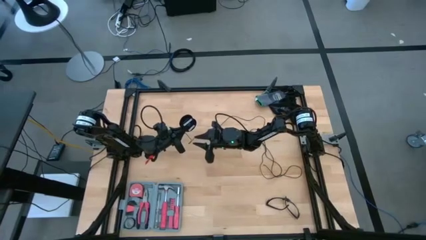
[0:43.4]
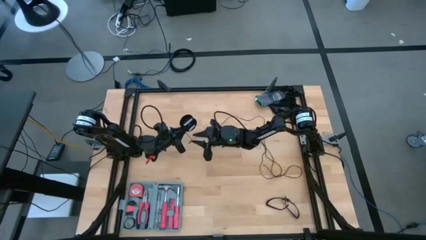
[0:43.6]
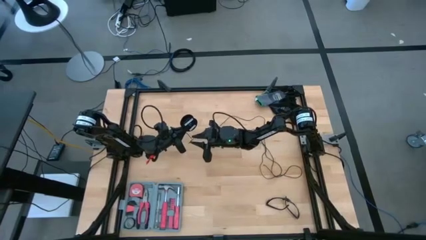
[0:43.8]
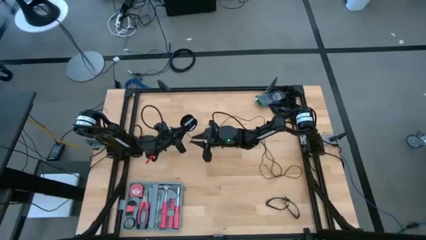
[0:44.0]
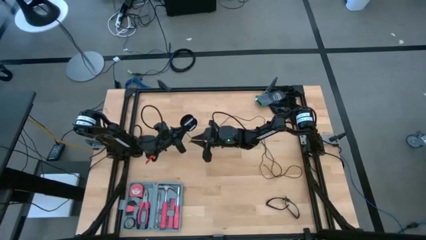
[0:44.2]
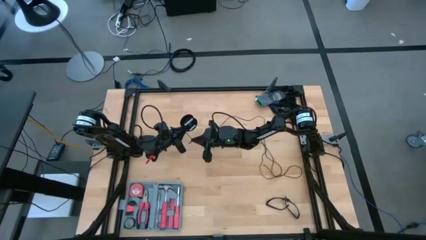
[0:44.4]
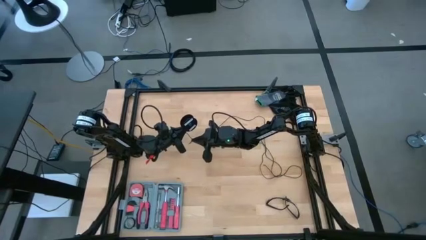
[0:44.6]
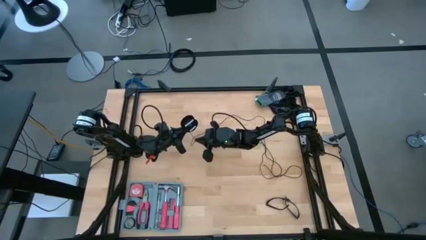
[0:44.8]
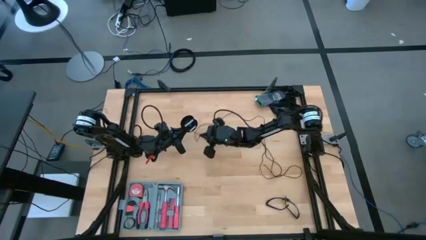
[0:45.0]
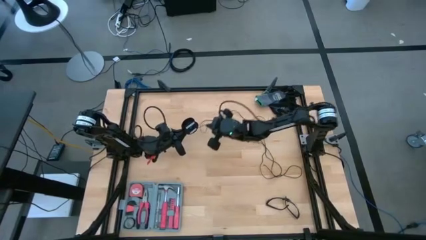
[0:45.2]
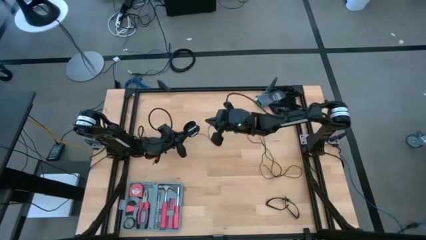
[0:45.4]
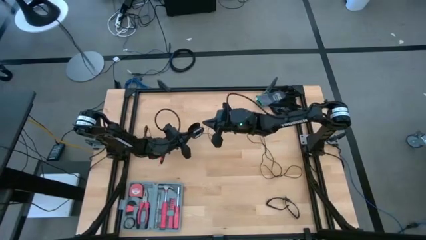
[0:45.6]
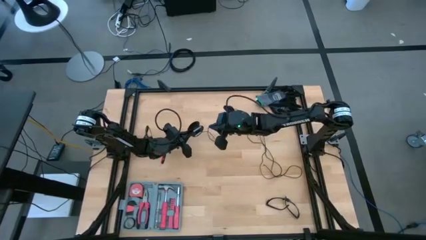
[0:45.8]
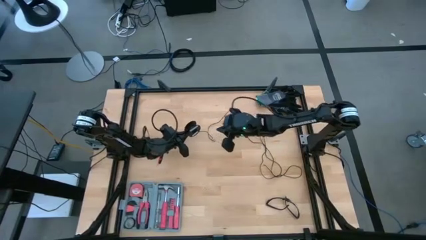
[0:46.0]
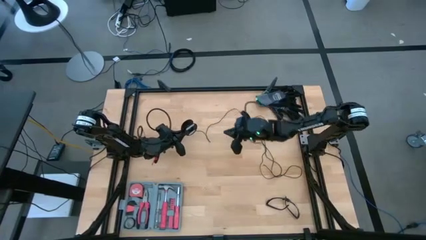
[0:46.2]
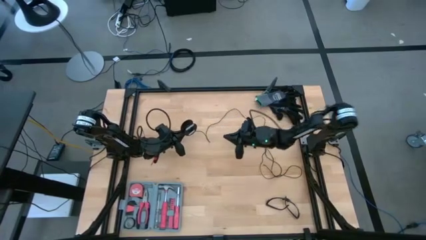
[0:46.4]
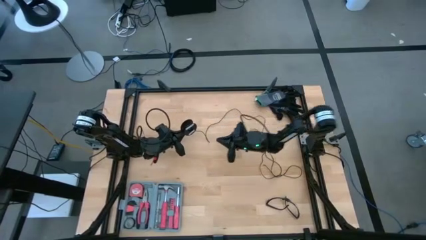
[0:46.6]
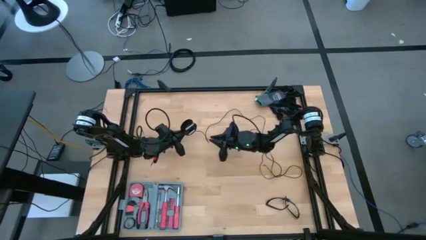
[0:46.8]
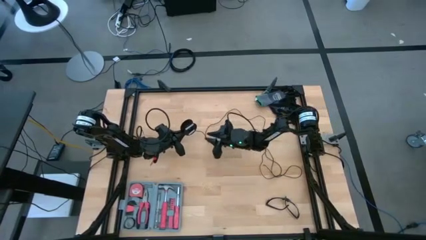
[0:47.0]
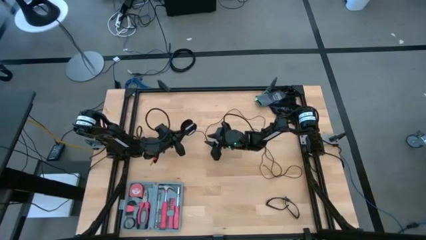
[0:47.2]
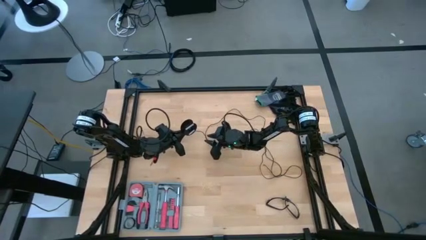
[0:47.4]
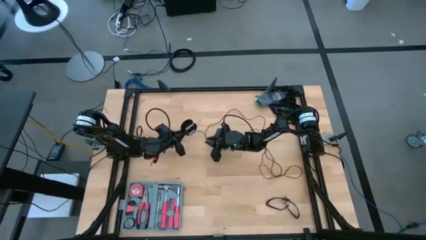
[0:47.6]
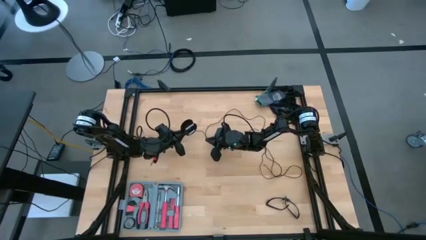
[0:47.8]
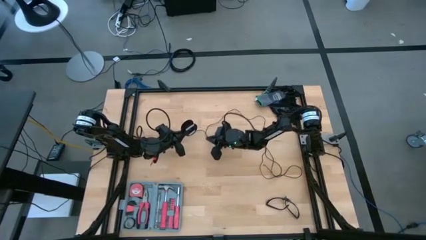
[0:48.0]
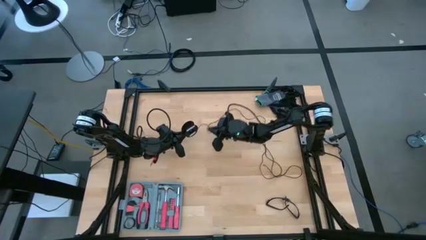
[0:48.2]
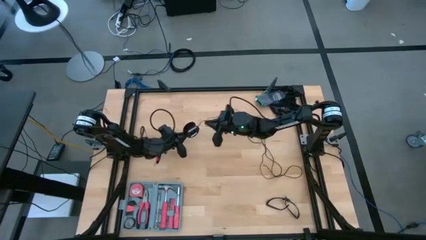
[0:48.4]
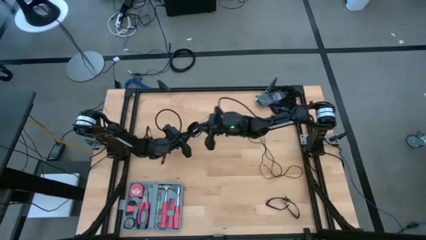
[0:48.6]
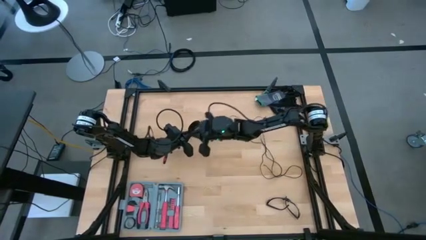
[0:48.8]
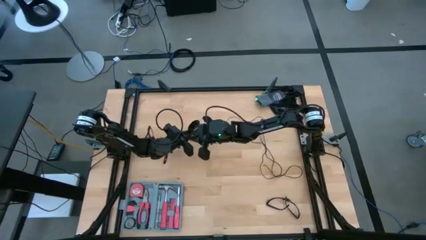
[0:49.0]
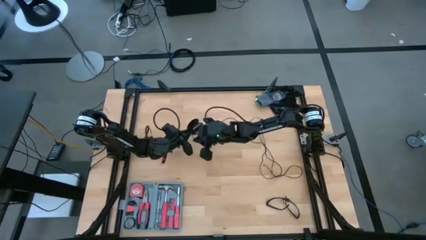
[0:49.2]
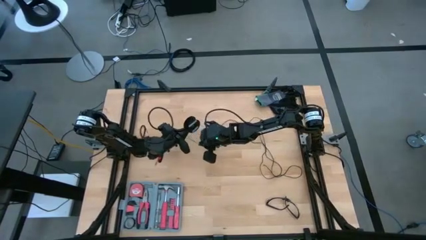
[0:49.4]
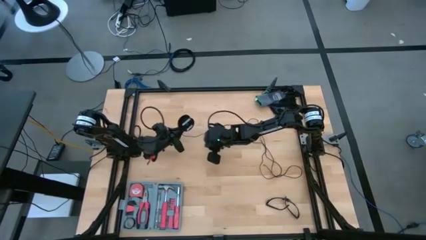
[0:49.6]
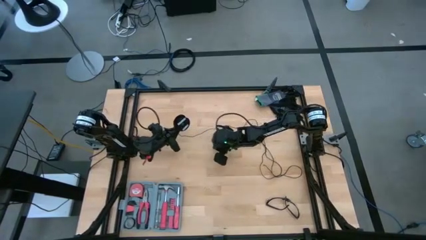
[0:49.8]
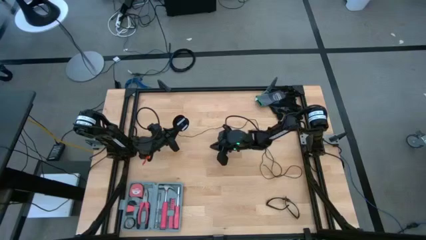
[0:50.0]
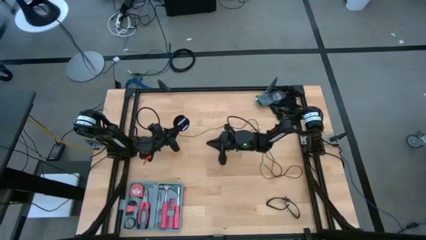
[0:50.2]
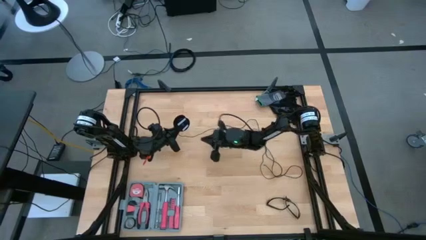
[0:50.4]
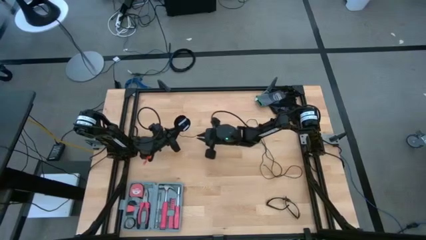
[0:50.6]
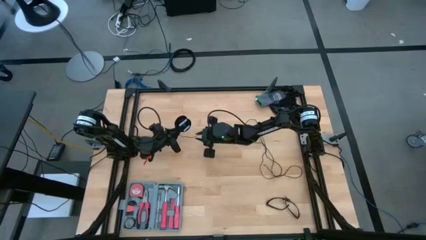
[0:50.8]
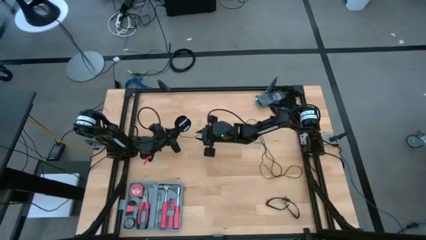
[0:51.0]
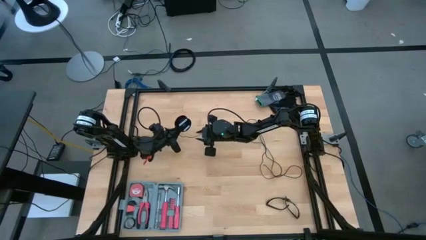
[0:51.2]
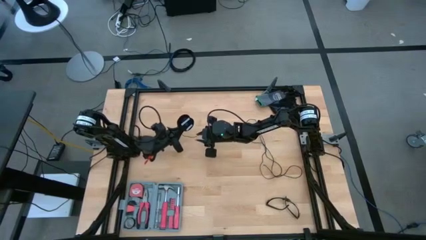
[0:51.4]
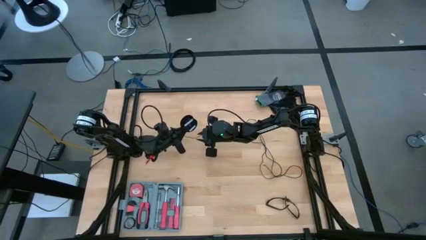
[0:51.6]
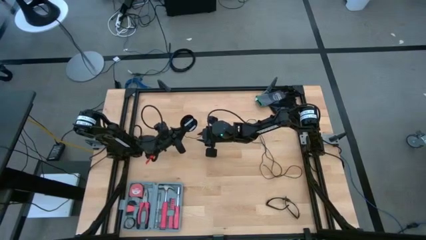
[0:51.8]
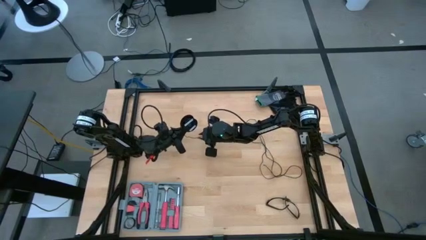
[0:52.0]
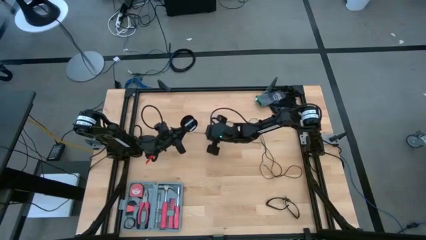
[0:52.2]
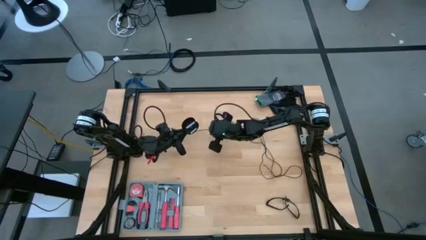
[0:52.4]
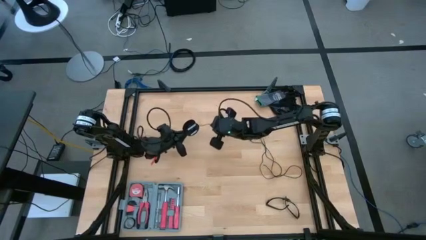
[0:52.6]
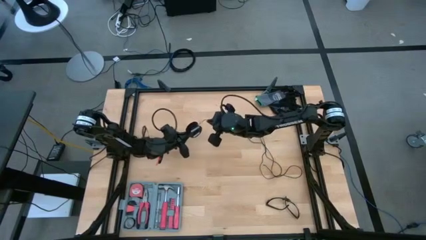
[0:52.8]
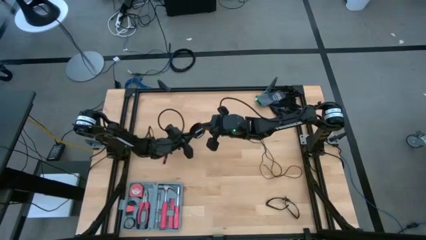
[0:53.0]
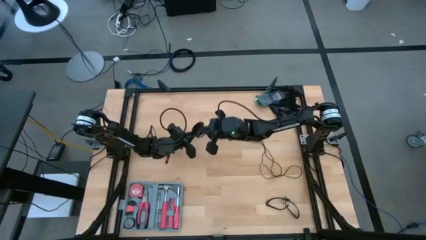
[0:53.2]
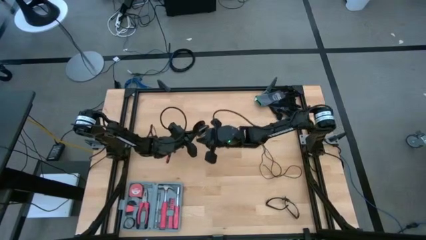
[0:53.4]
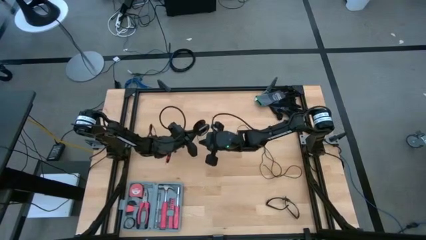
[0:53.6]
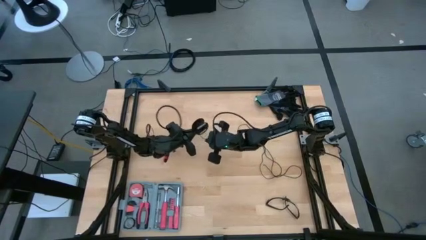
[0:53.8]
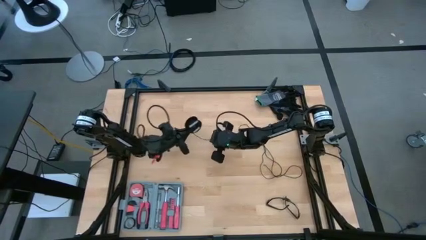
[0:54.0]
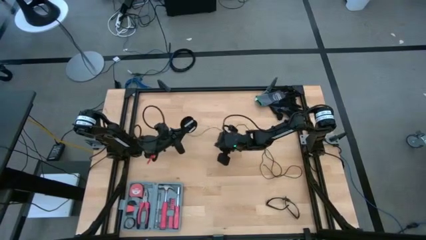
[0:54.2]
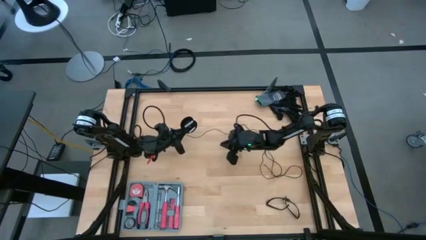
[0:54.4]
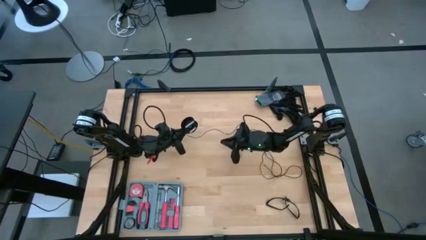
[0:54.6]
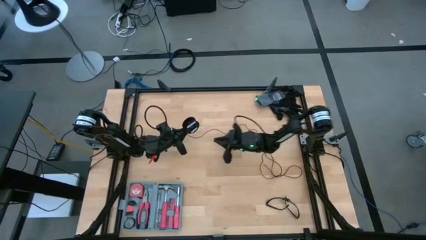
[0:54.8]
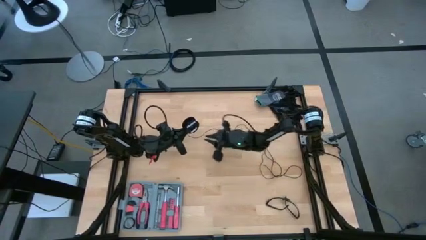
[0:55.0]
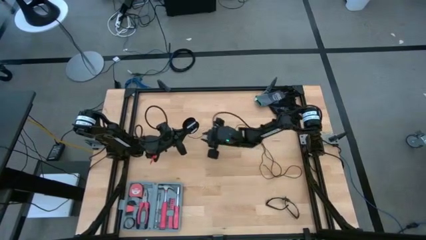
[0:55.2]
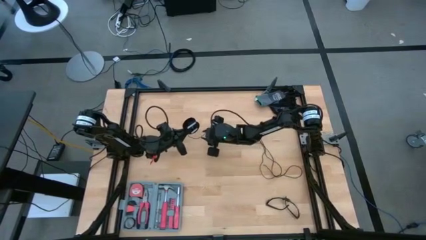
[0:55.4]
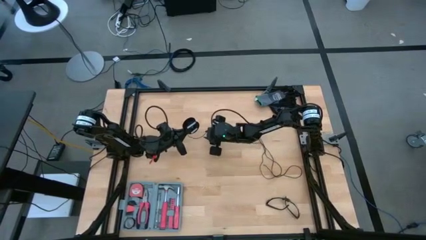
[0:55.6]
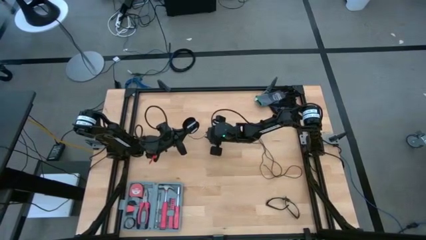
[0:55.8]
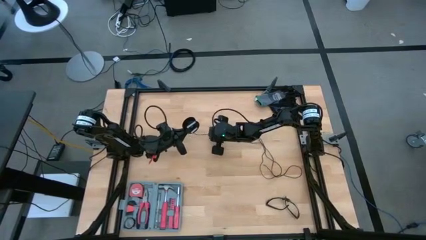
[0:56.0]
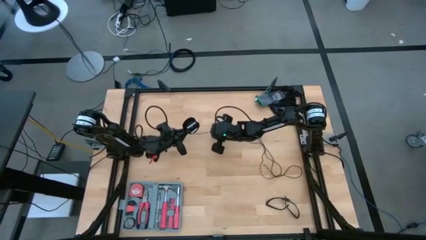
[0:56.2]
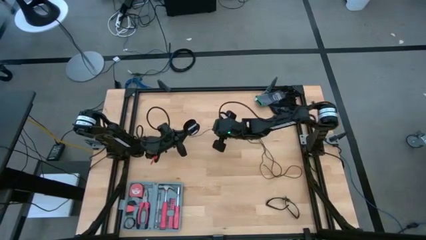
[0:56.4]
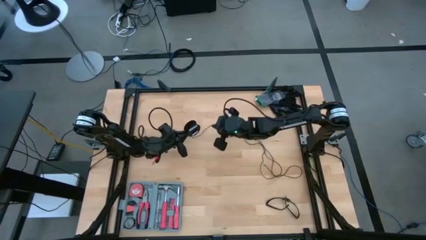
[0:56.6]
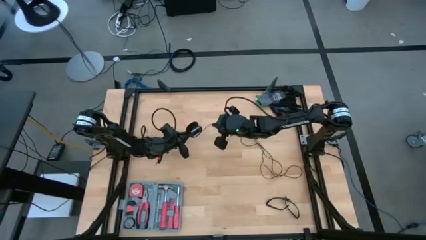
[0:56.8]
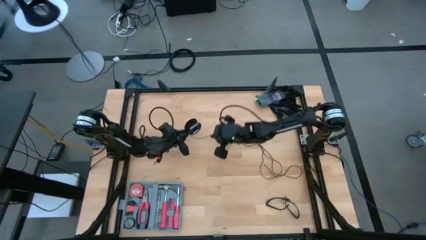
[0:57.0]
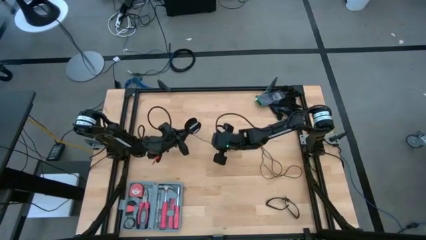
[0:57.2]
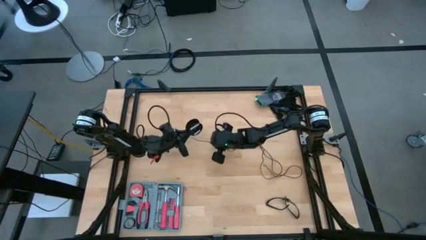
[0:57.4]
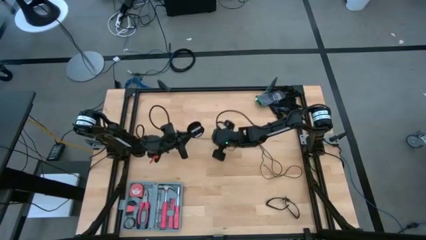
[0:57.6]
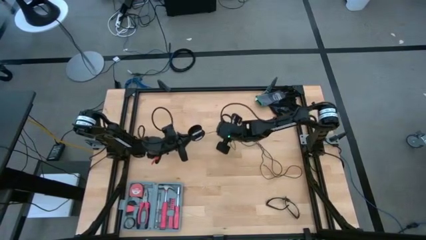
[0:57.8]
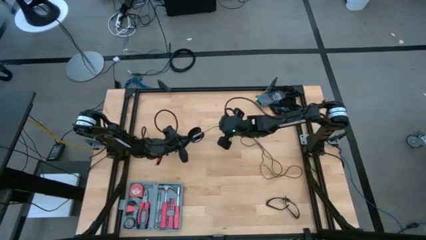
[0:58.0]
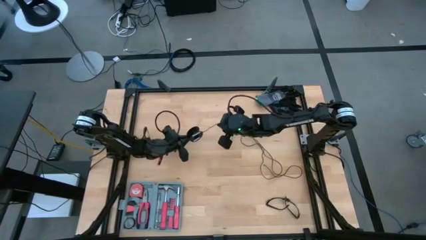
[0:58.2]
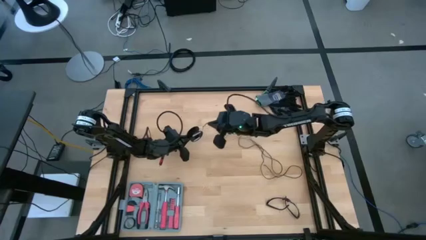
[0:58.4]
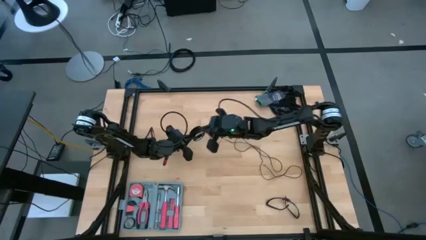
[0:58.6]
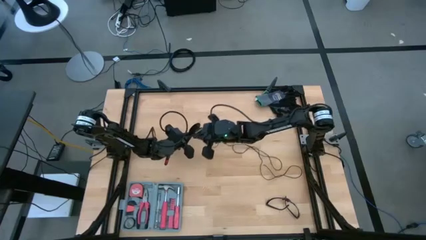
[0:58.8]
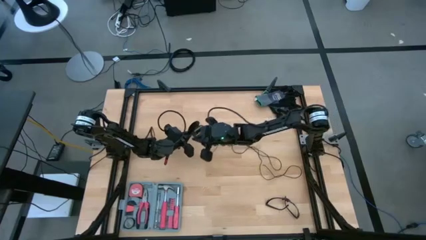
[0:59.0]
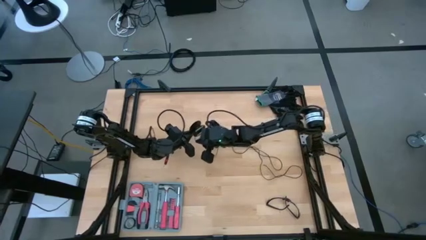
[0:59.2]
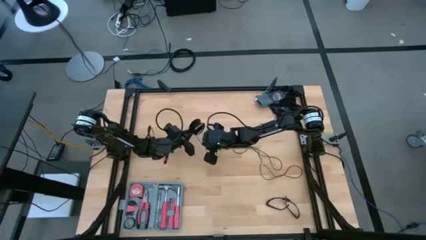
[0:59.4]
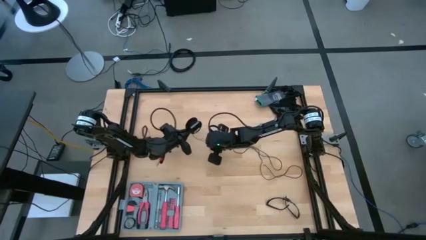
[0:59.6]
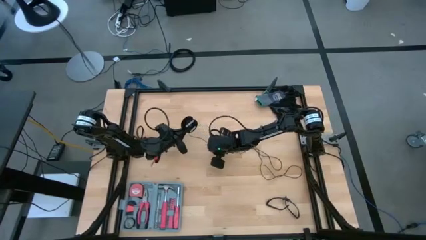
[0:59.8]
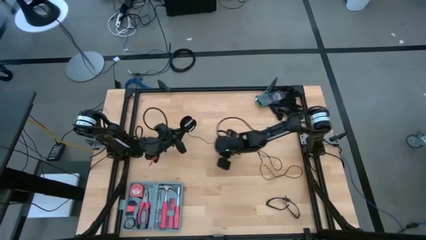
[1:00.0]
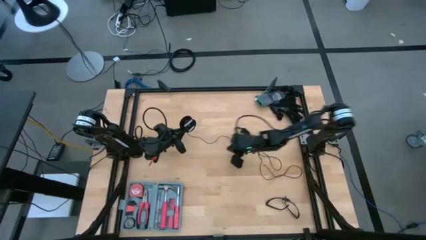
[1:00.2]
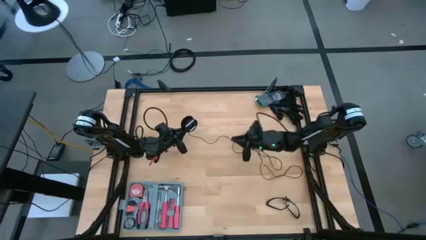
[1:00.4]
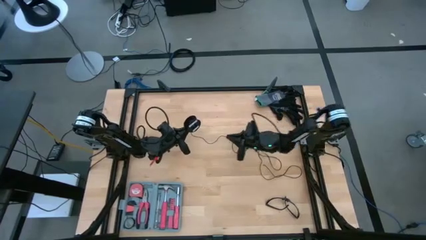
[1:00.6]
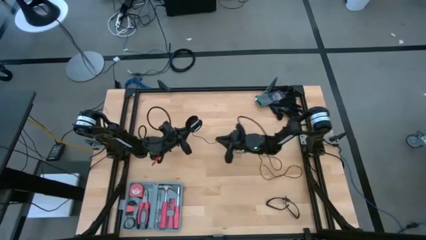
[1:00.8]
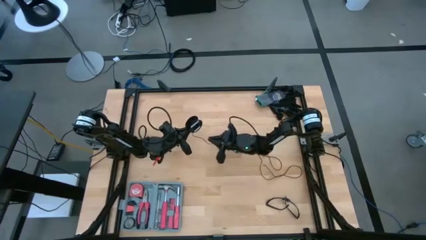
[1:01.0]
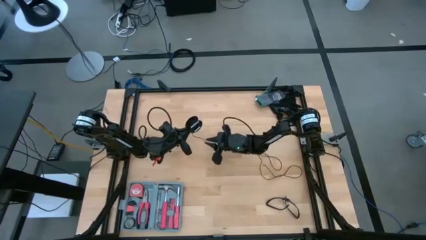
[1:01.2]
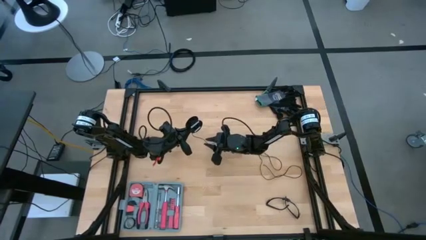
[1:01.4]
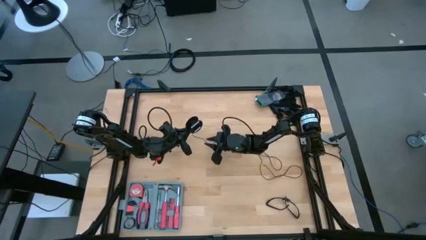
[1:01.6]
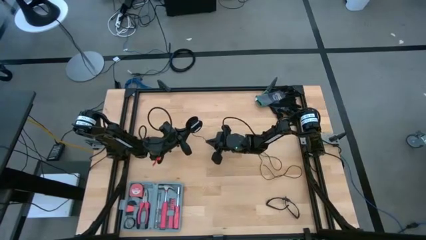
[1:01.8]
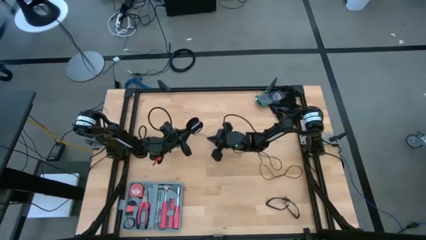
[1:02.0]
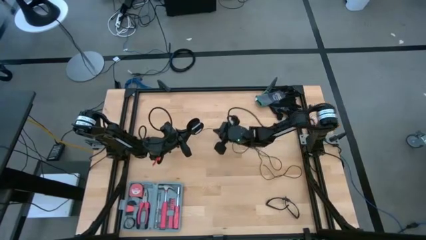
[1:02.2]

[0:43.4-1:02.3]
Task: Coil cords
Coil the black wire onto the spool
